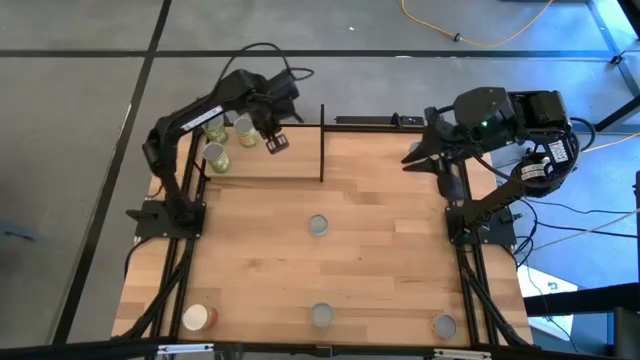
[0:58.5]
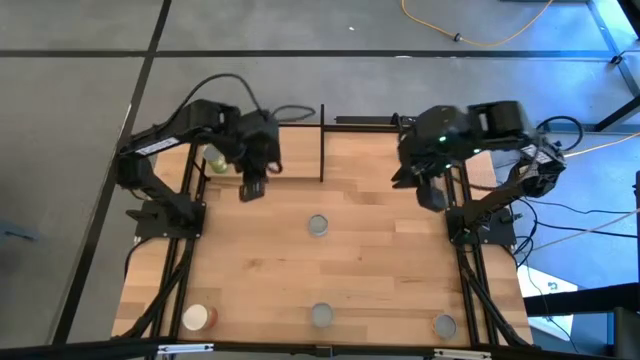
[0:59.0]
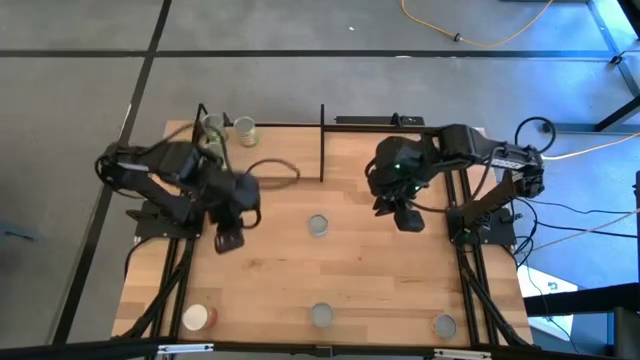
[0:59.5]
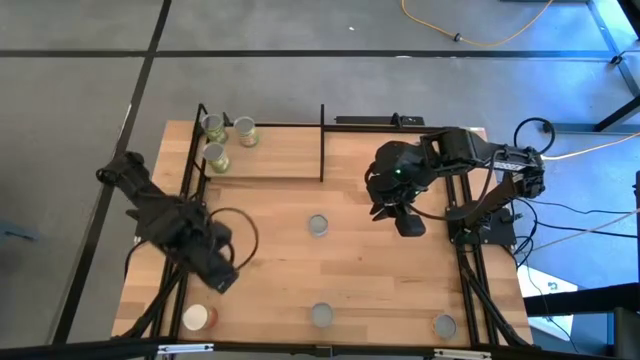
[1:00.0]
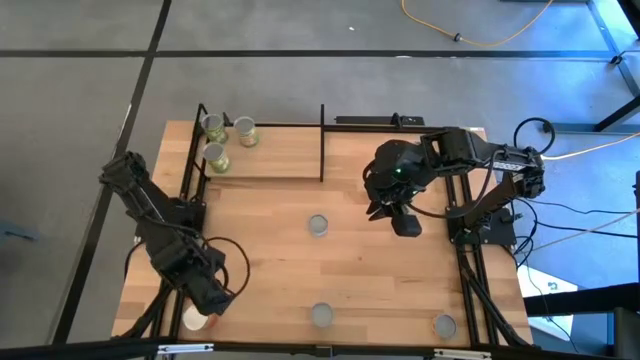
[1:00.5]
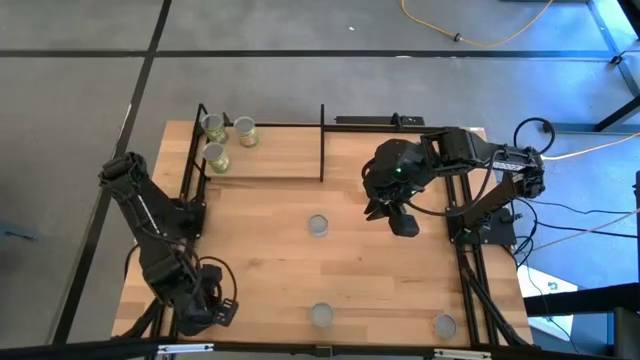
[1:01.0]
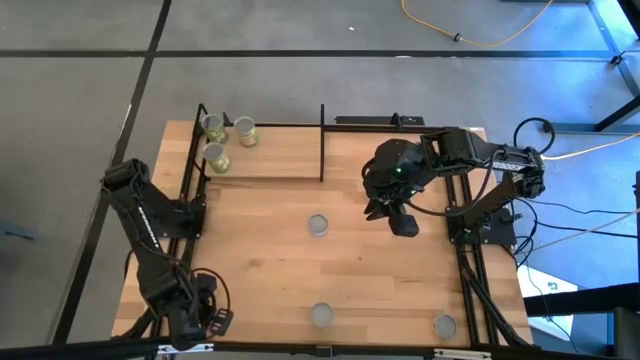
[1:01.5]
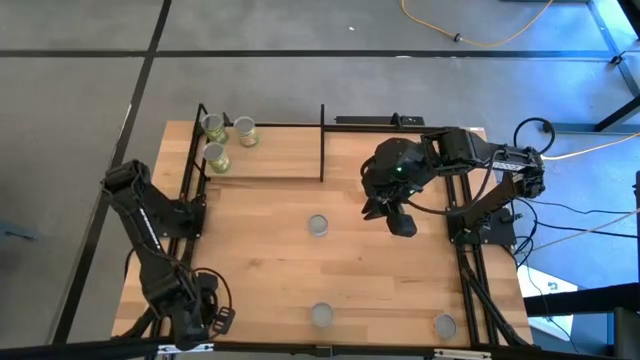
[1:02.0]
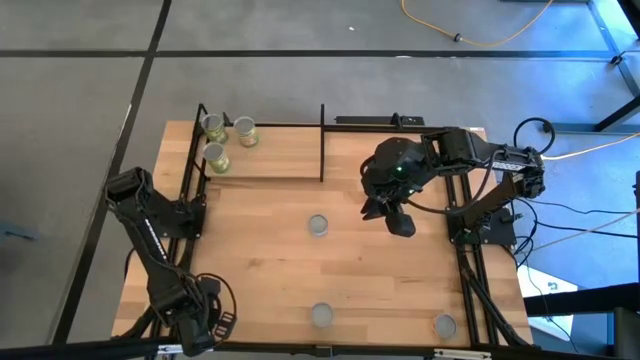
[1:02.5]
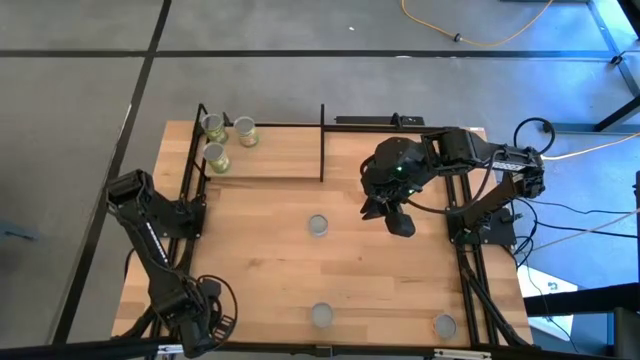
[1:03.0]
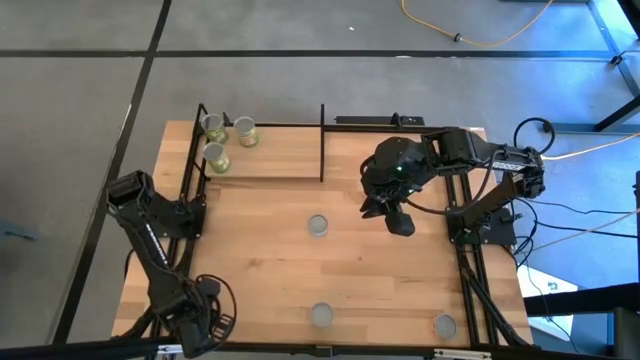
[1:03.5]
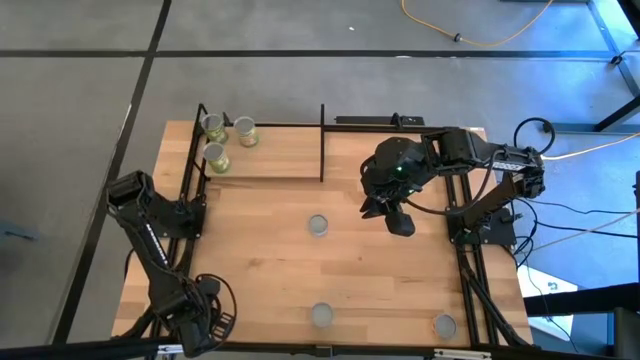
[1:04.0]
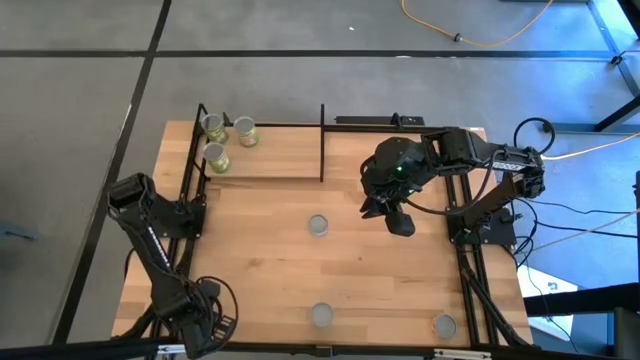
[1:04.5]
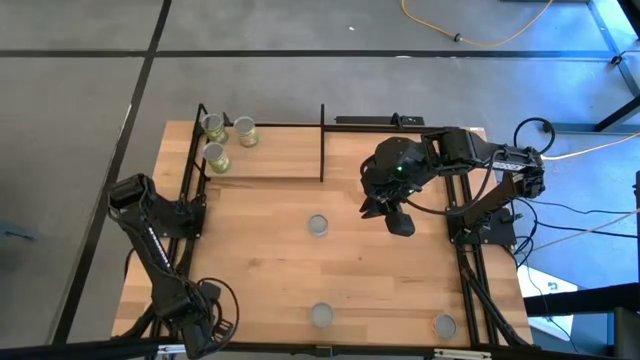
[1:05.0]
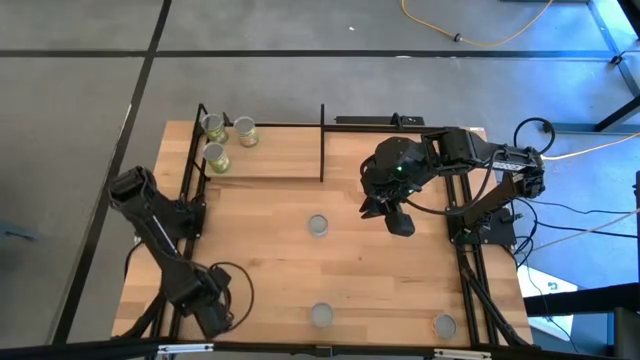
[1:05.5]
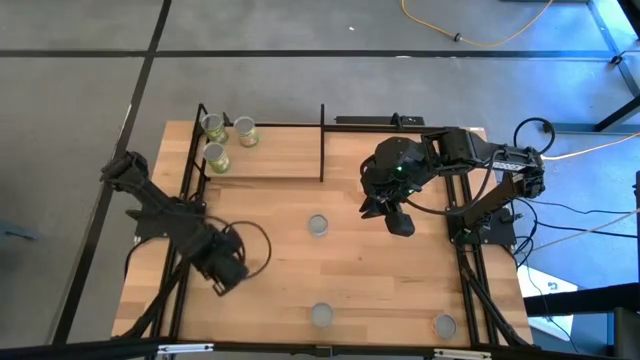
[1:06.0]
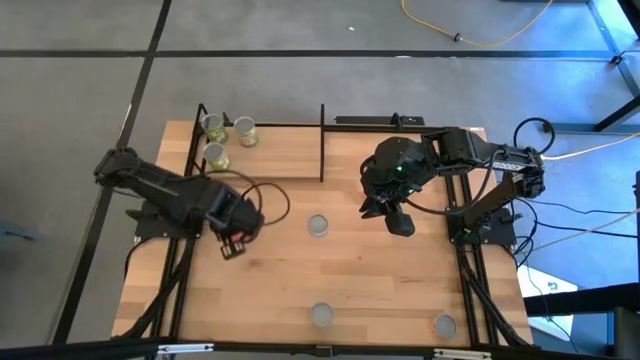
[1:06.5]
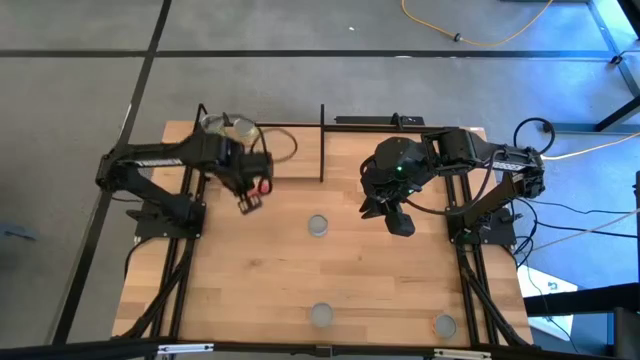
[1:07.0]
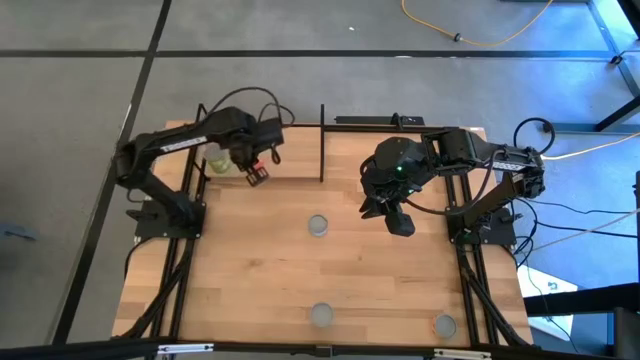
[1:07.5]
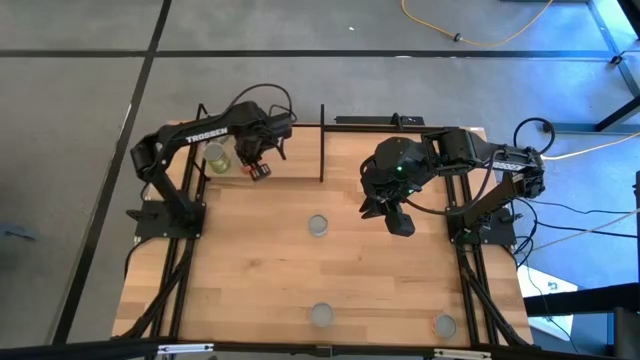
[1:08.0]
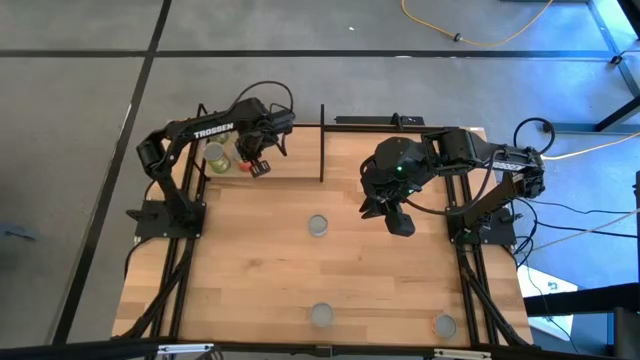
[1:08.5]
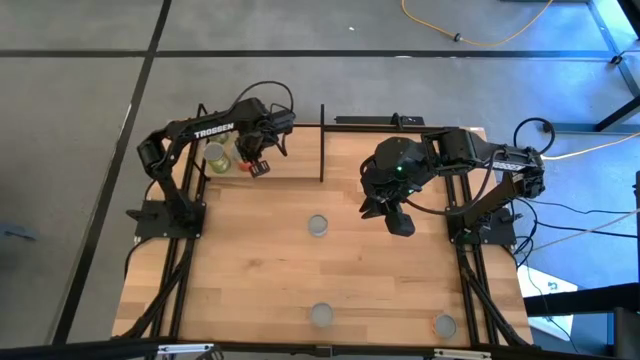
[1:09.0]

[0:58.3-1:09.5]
Task: Pick and place cans onto a shelf
Put the canned pineapple on the shelf

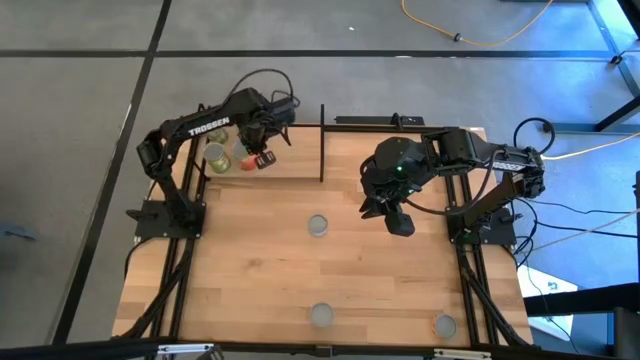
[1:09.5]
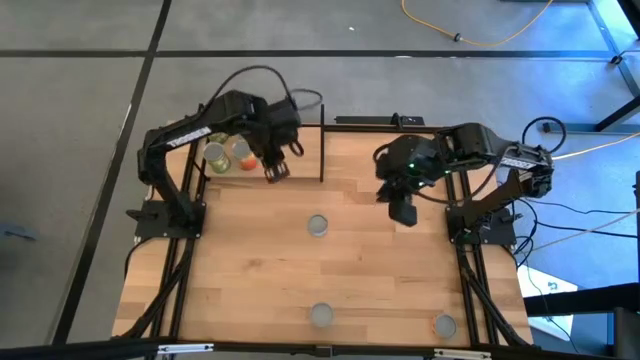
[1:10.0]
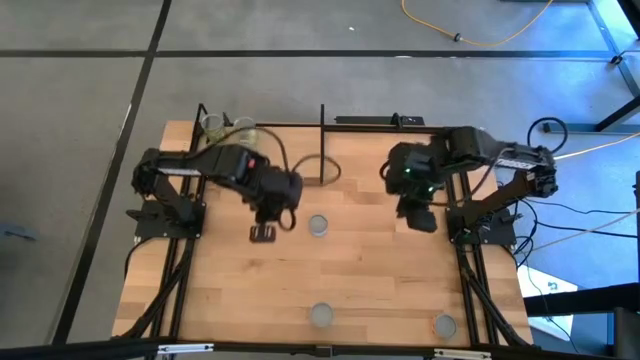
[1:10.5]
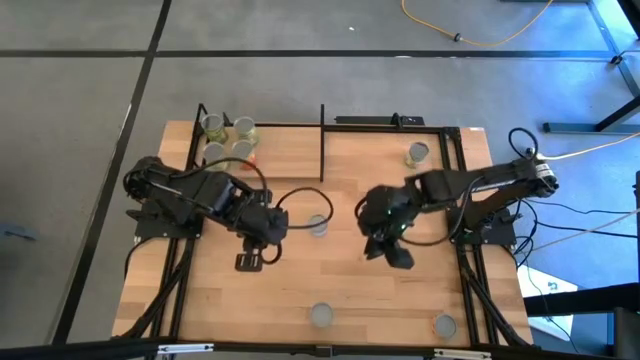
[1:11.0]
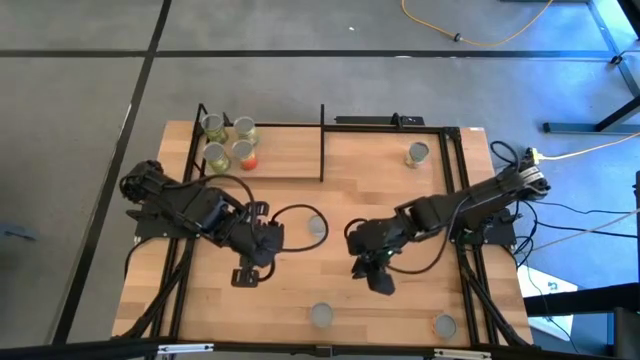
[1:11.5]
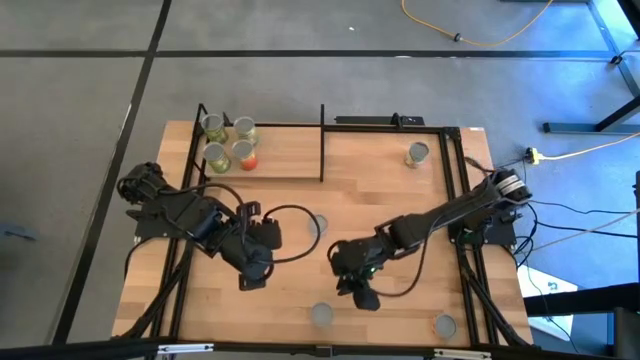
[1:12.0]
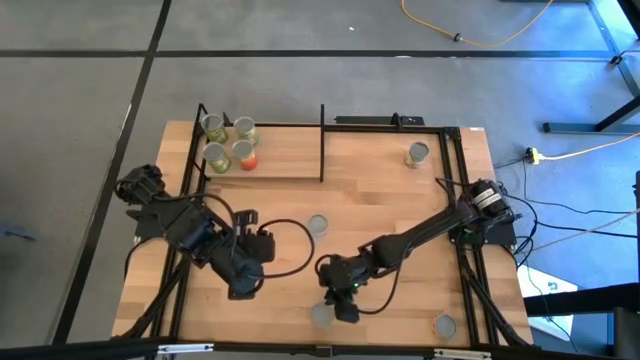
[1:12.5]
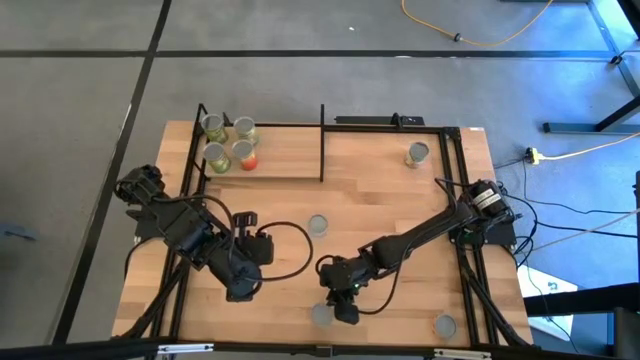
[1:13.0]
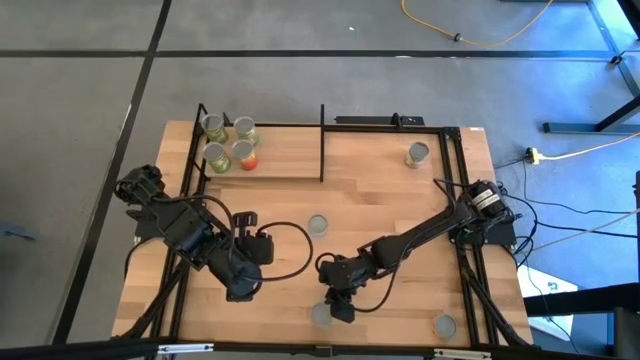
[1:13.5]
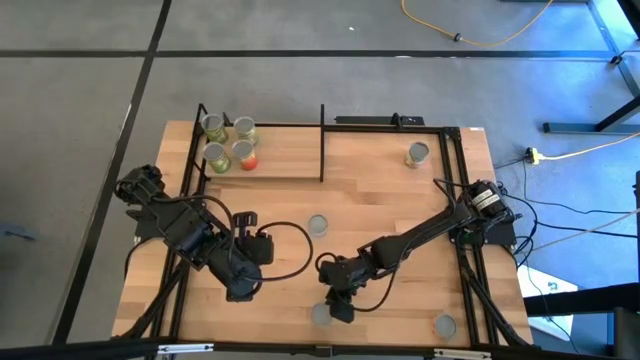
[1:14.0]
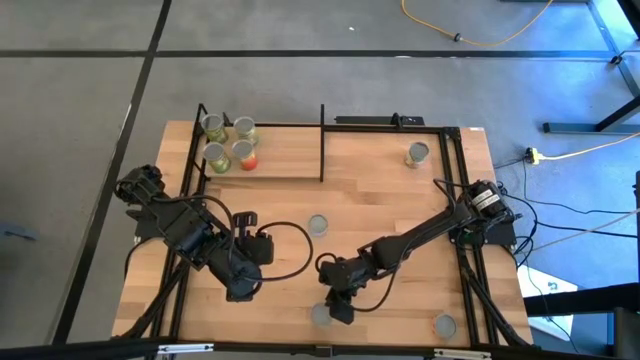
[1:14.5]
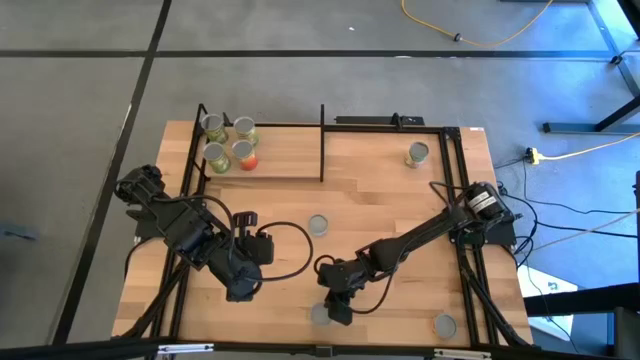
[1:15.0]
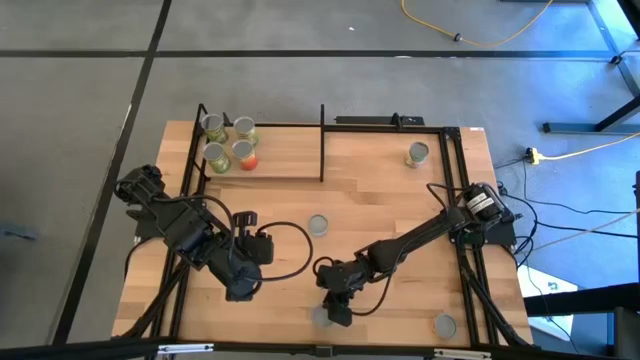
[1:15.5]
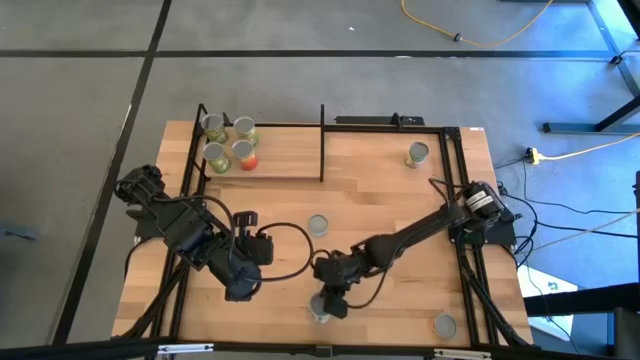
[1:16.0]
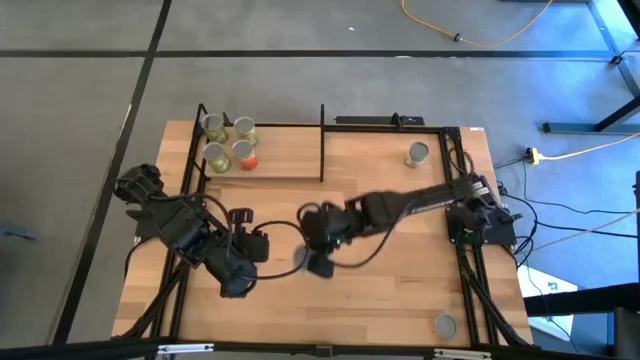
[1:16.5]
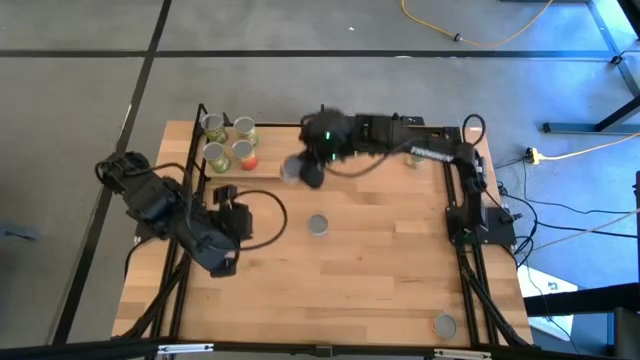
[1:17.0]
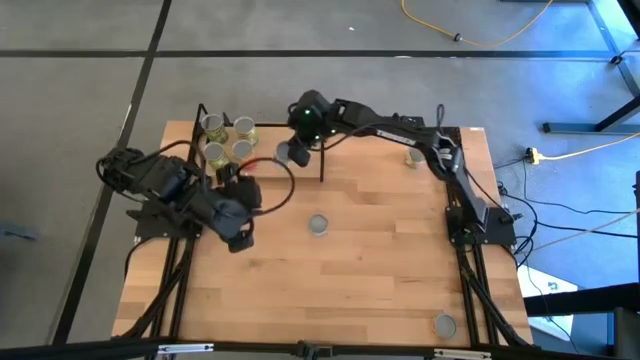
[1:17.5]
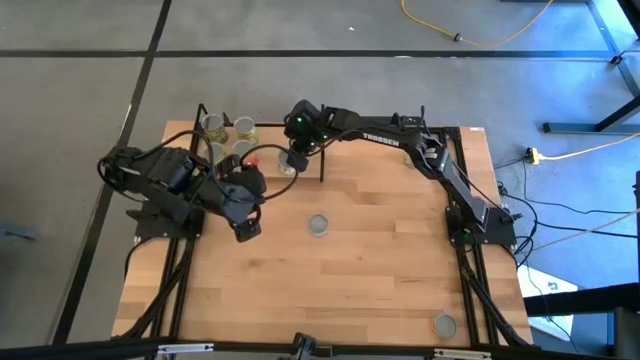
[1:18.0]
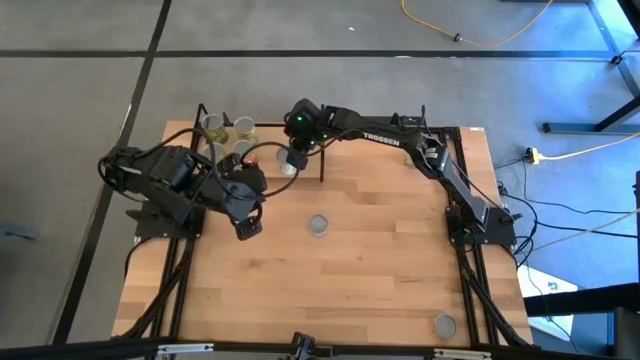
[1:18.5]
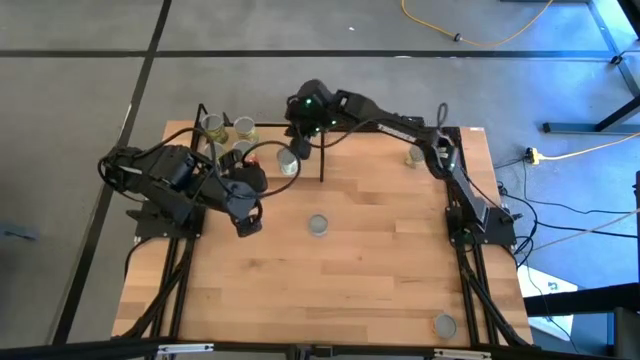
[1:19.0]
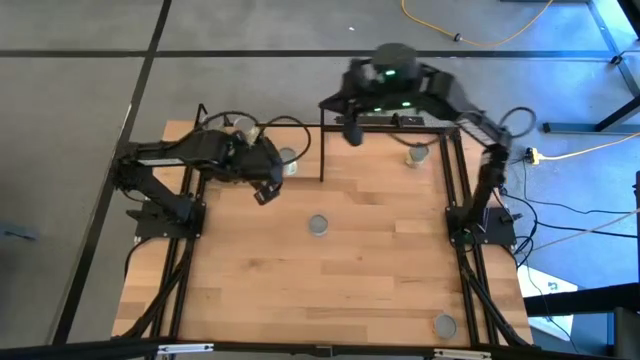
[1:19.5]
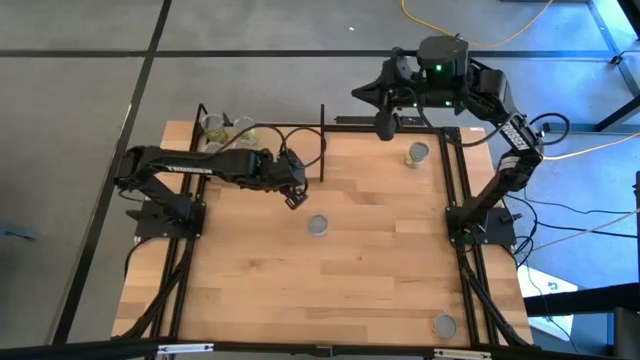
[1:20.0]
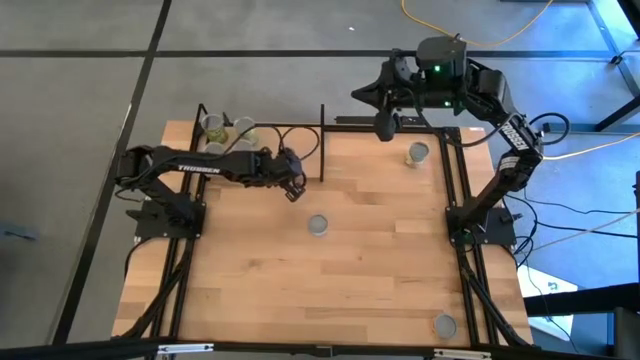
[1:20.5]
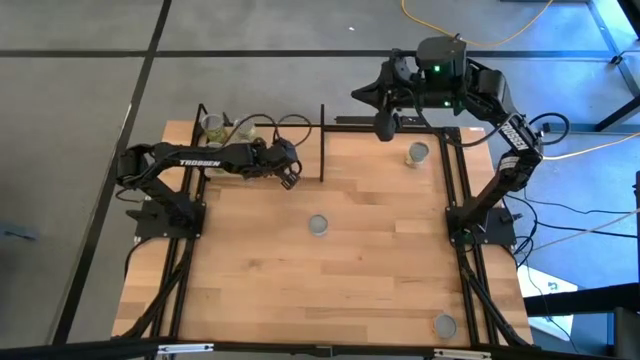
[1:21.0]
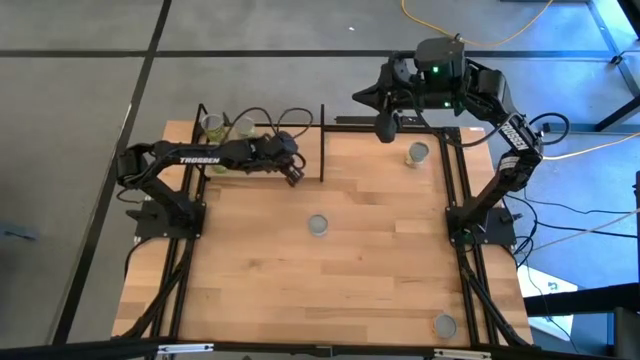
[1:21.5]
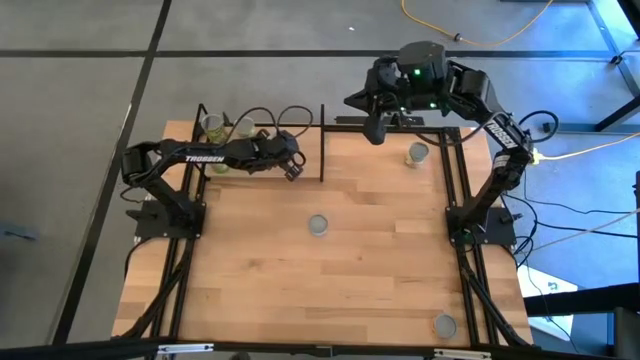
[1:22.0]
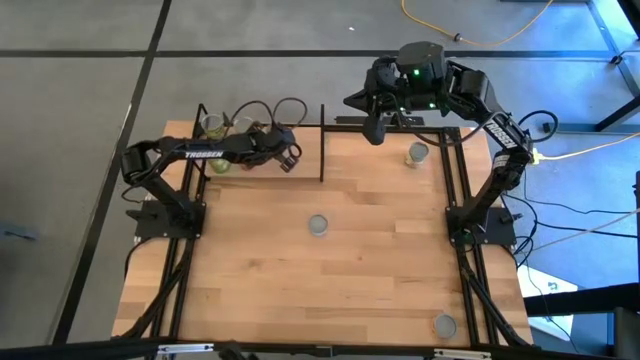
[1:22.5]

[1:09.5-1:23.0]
Put the canned mixed vegetables on the shelf
